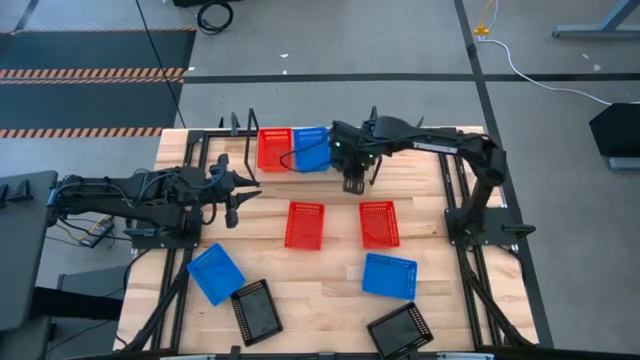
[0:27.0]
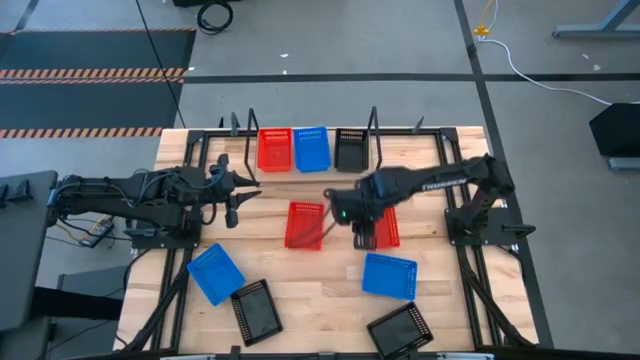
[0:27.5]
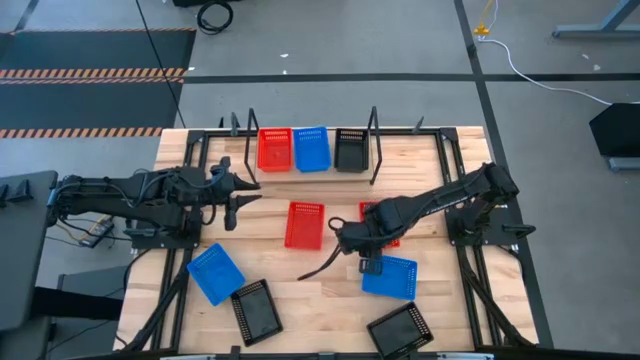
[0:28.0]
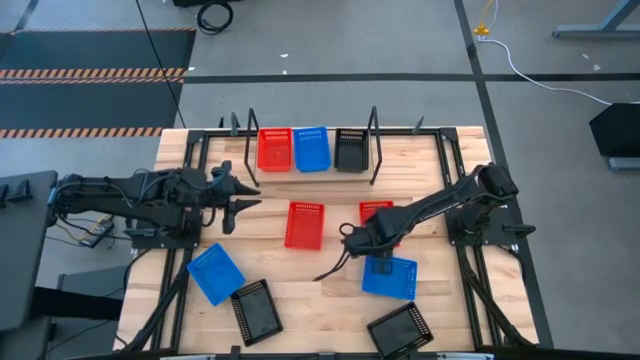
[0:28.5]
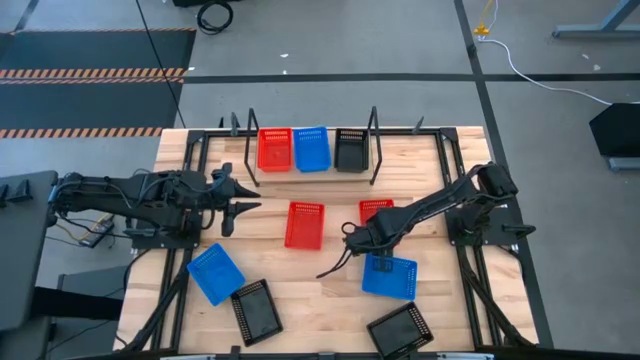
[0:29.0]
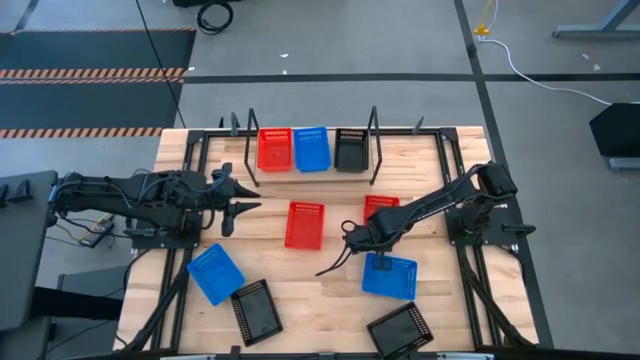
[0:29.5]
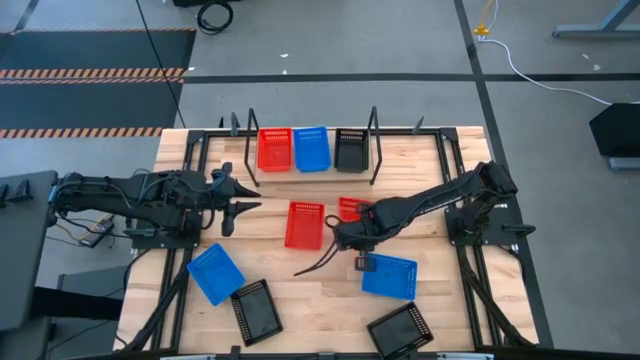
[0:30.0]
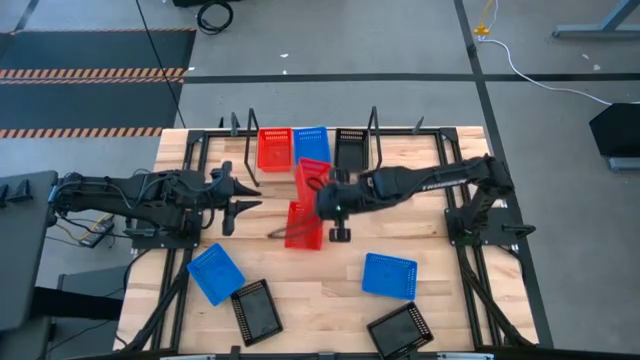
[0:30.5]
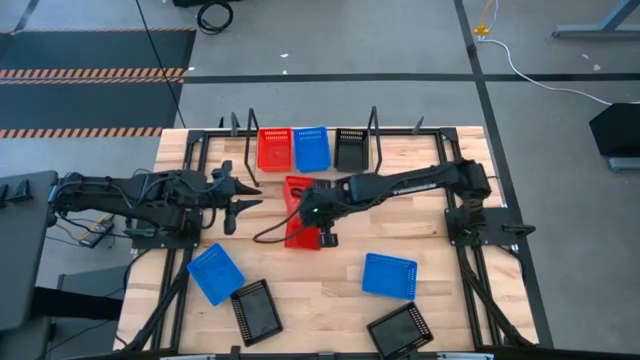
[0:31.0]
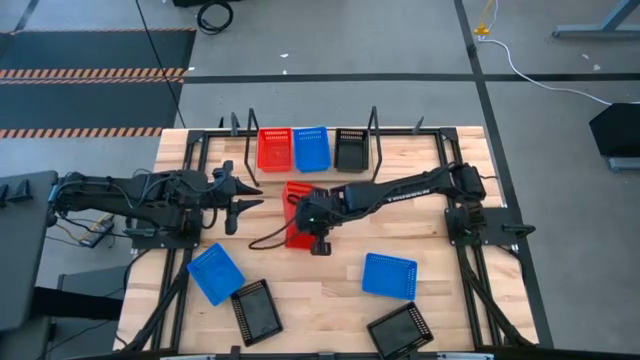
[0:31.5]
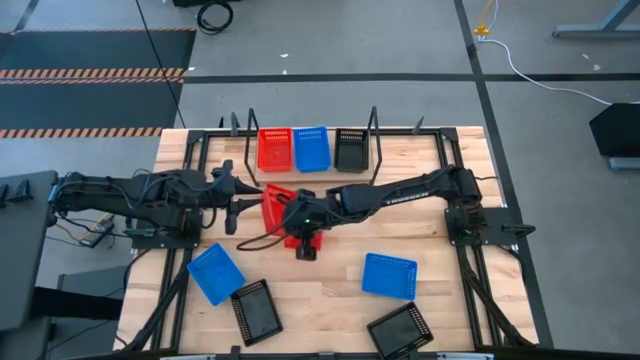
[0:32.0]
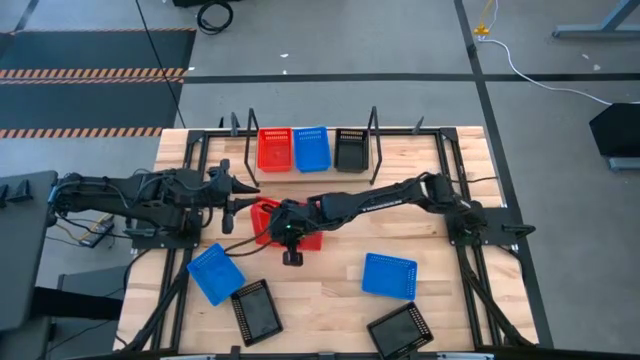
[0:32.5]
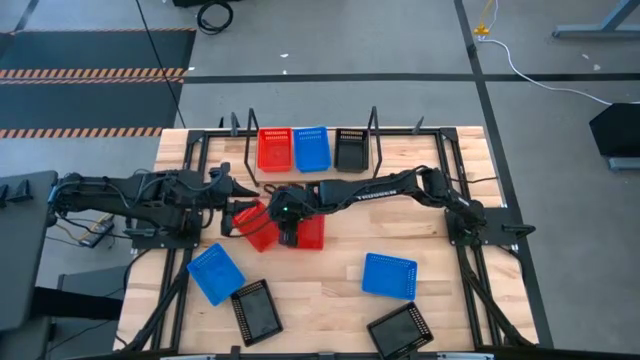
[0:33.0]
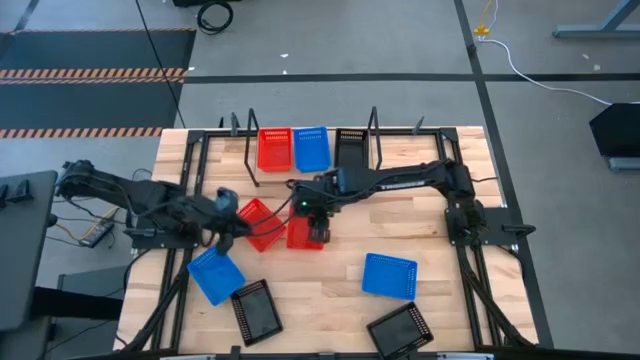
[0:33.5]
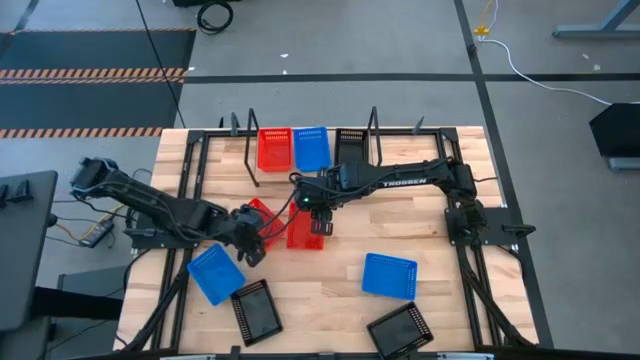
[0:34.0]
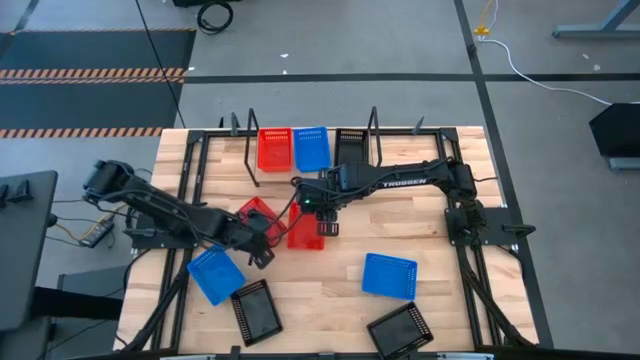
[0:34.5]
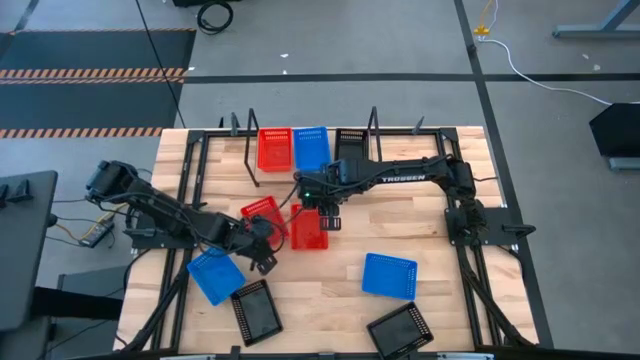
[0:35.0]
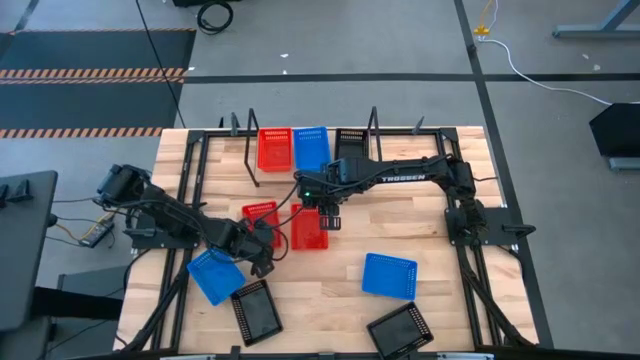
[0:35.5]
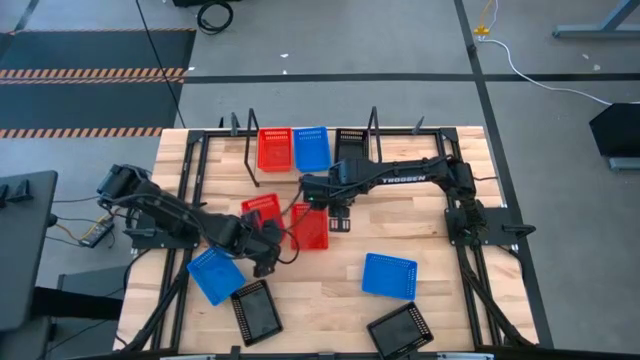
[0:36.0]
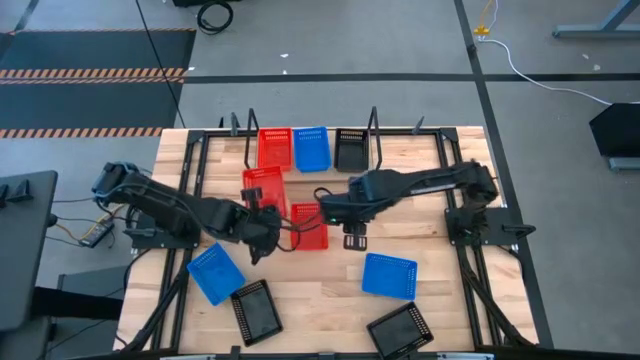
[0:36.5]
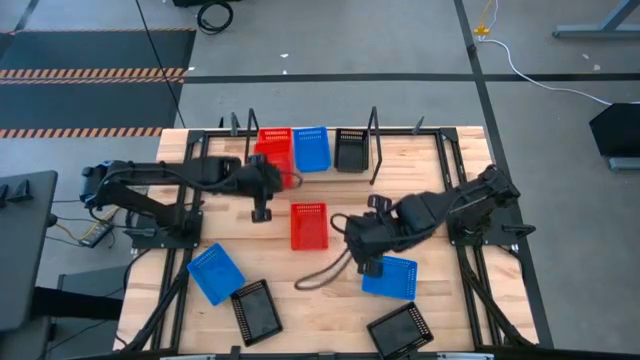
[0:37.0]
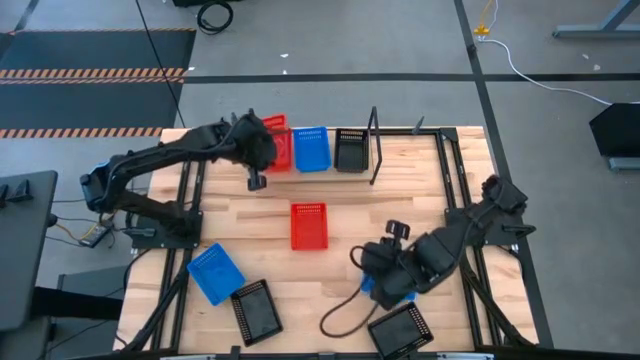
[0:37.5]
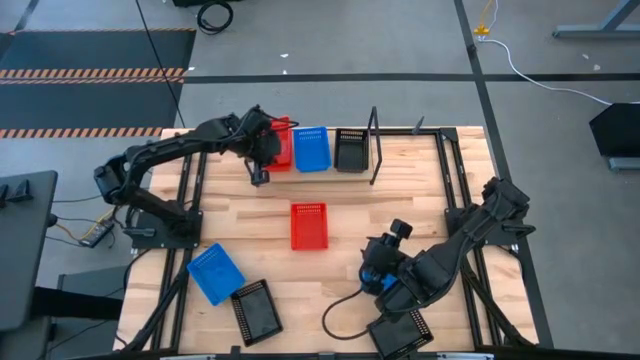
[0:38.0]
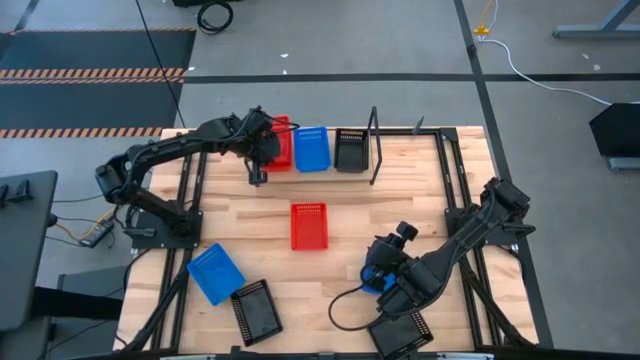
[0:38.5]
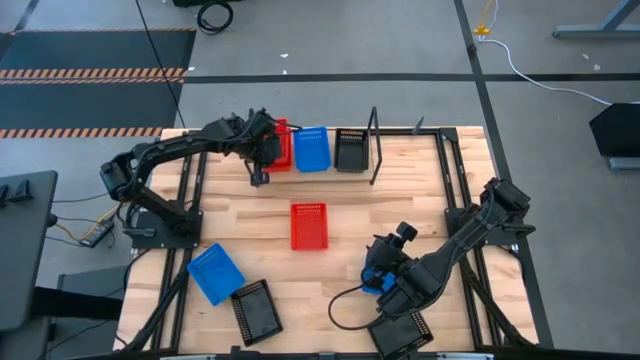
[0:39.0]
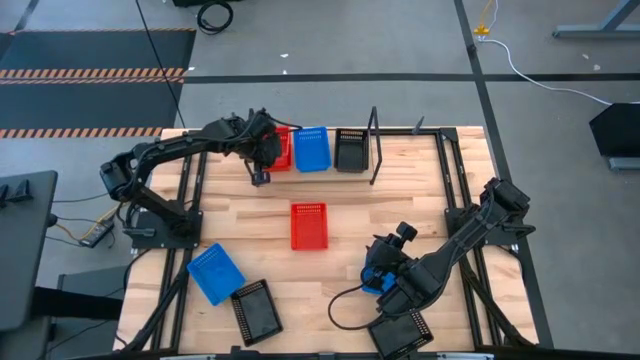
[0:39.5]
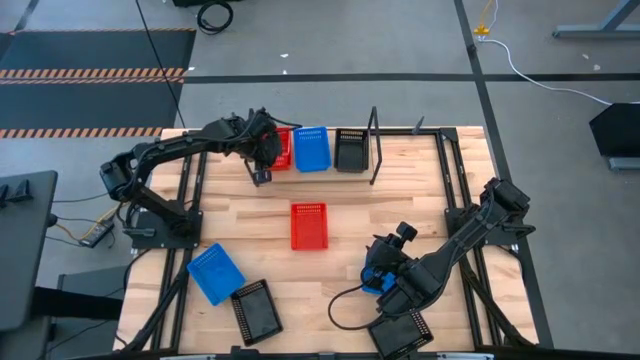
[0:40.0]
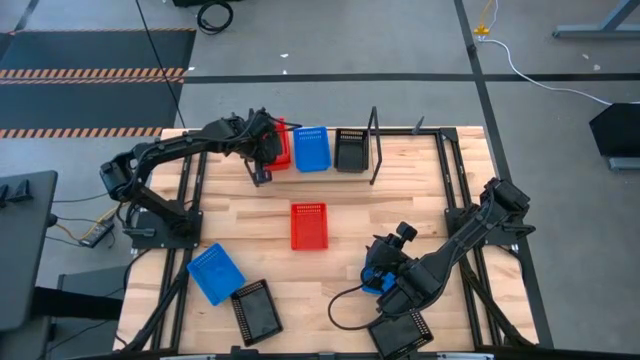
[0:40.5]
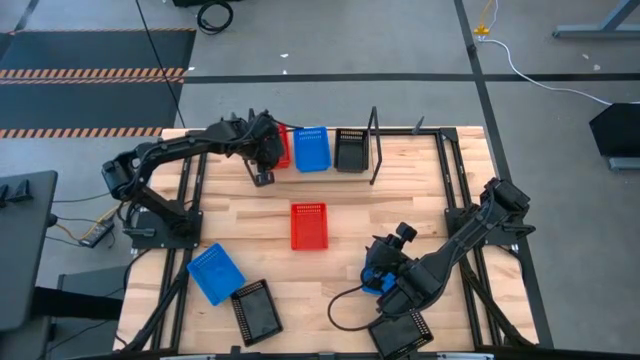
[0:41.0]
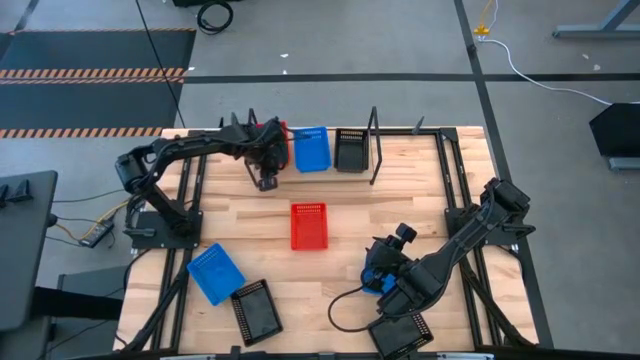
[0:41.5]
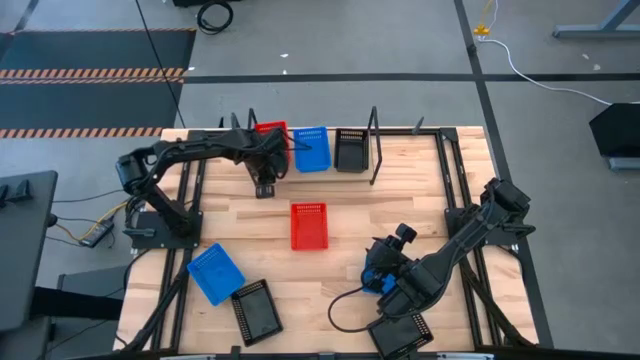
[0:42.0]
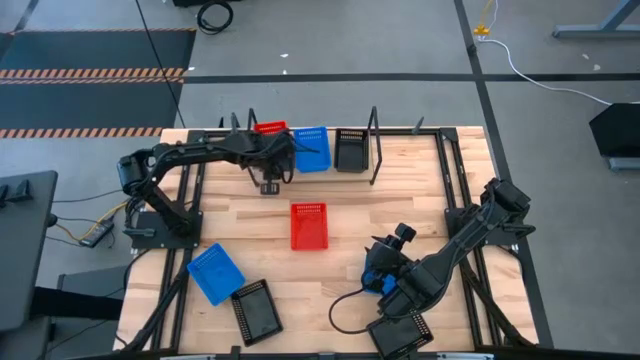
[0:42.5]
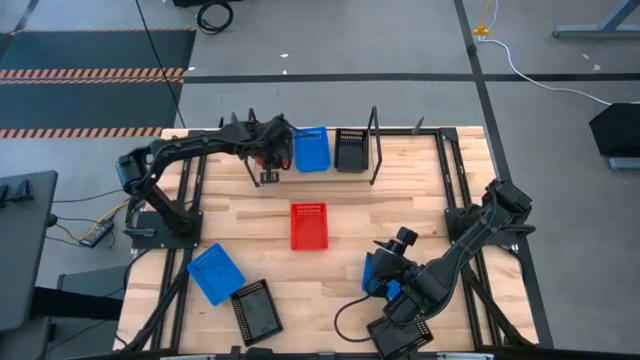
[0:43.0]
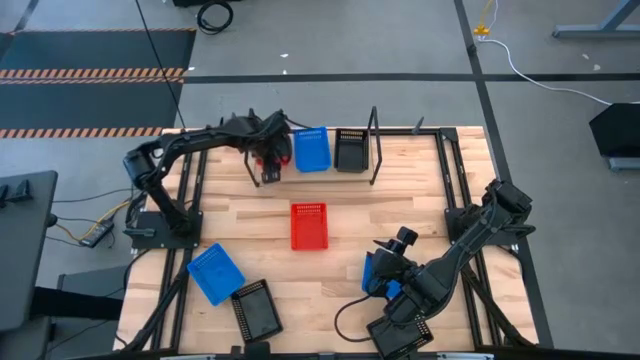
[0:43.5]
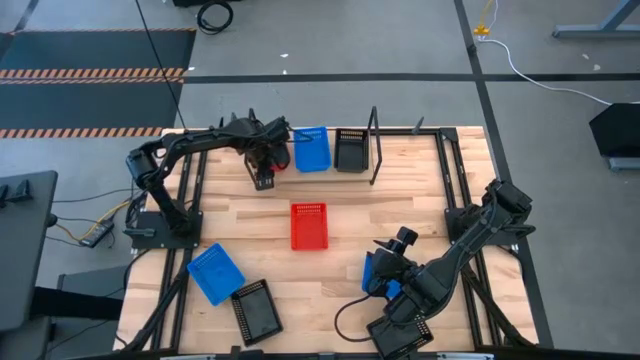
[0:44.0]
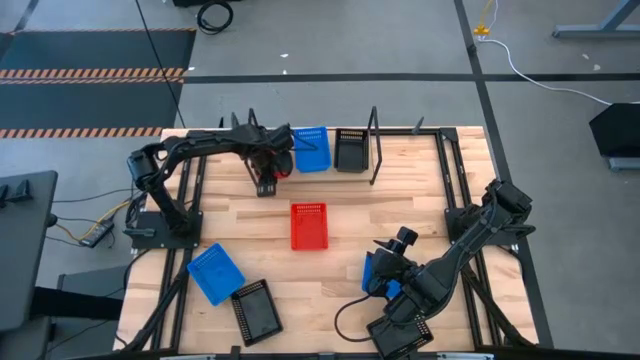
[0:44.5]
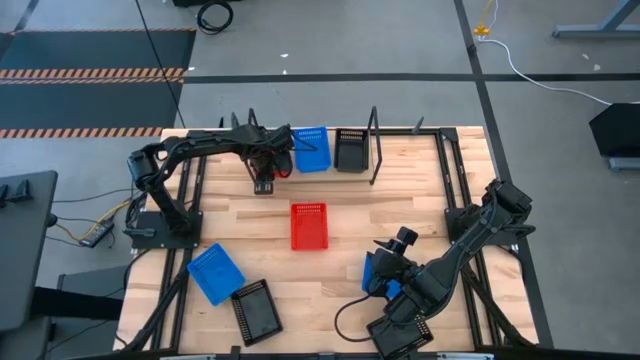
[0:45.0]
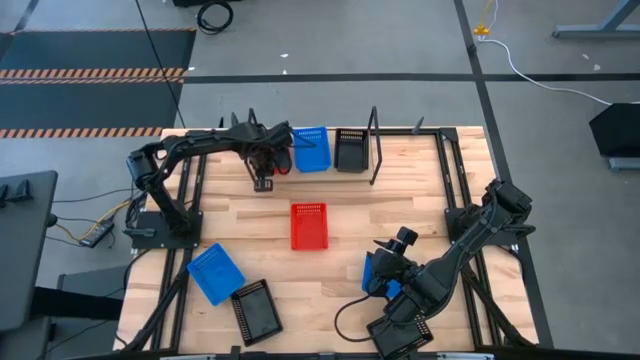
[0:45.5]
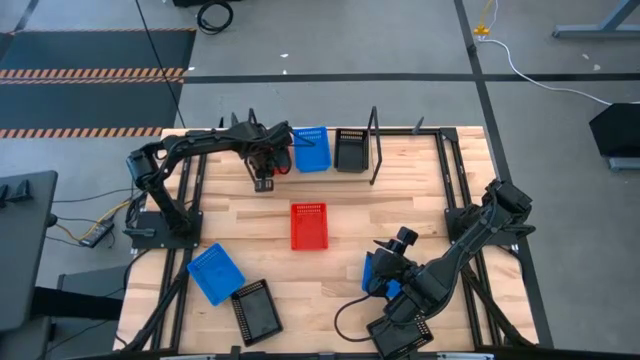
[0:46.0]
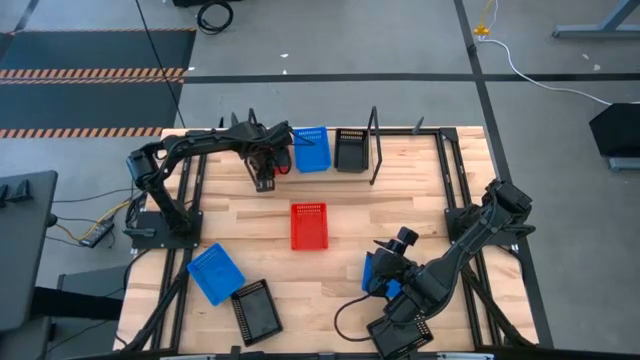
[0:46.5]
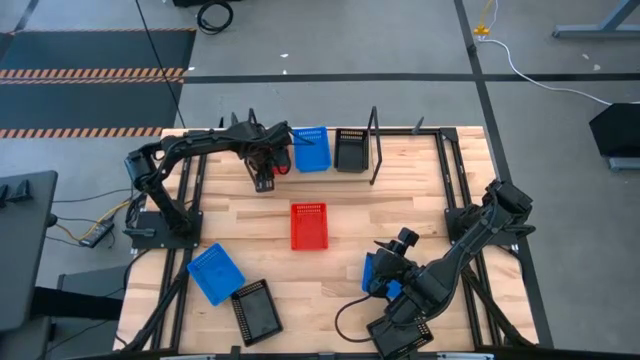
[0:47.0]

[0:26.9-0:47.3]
Task: Stack baskets on shelf by color
Stack the right red bin on top of the red bin on the shelf
